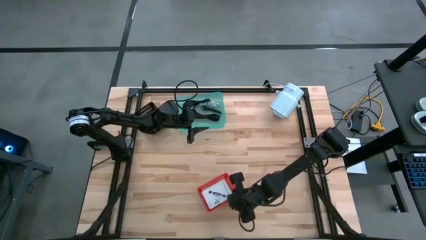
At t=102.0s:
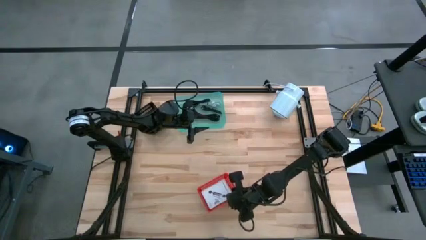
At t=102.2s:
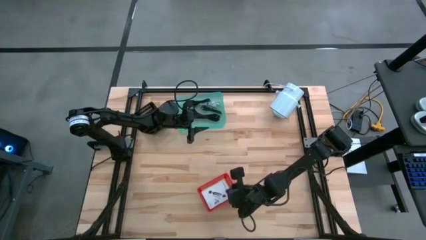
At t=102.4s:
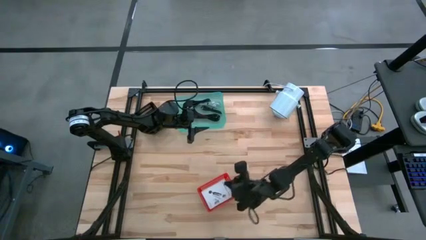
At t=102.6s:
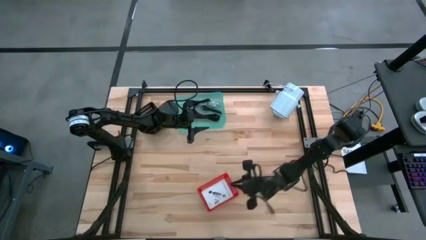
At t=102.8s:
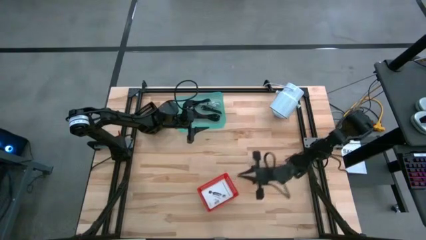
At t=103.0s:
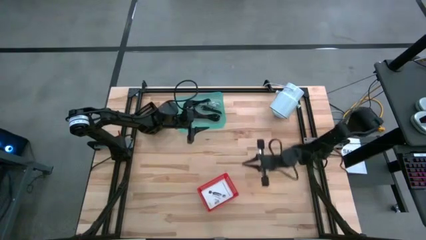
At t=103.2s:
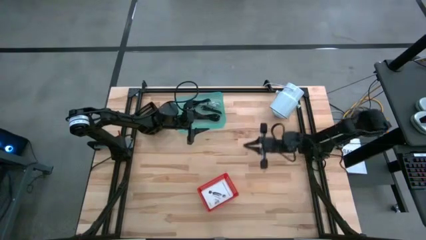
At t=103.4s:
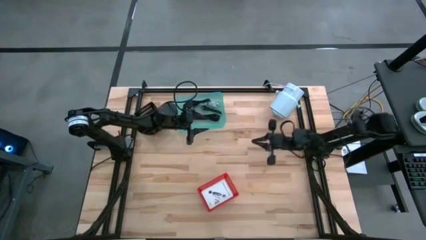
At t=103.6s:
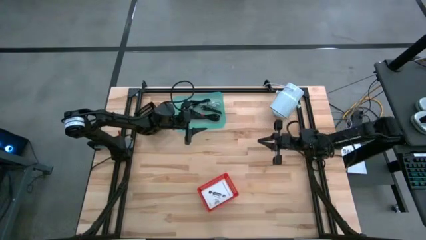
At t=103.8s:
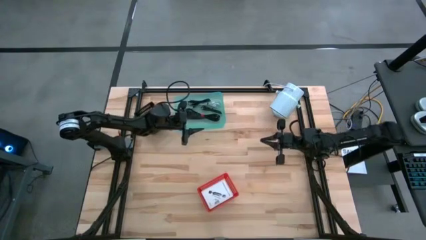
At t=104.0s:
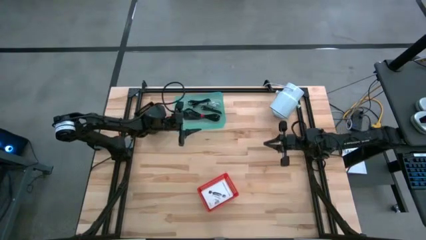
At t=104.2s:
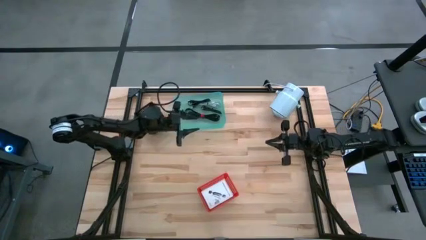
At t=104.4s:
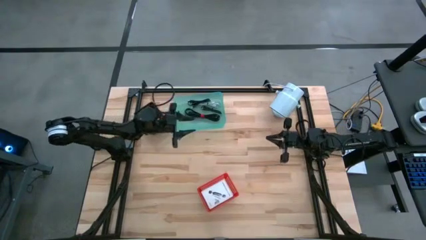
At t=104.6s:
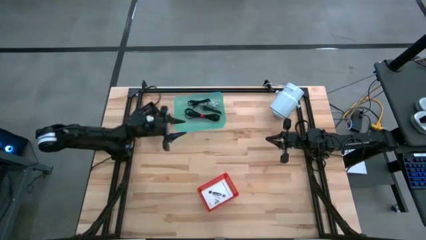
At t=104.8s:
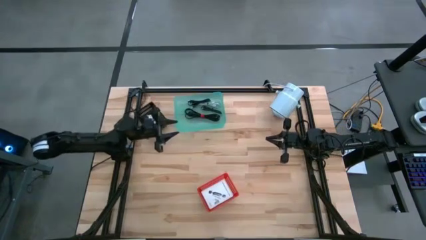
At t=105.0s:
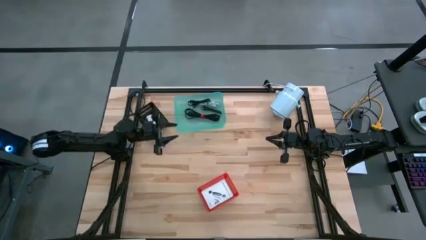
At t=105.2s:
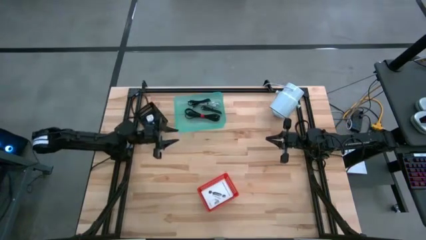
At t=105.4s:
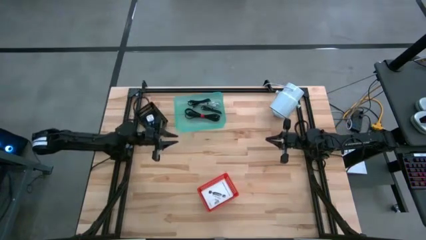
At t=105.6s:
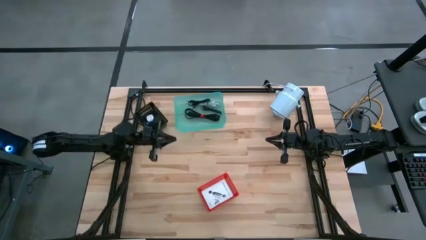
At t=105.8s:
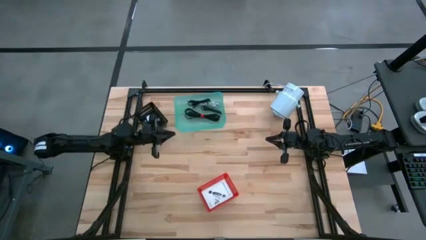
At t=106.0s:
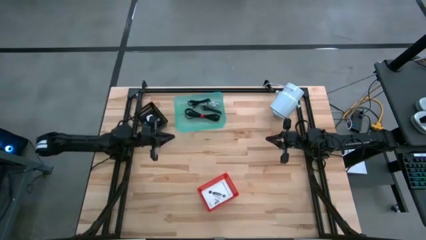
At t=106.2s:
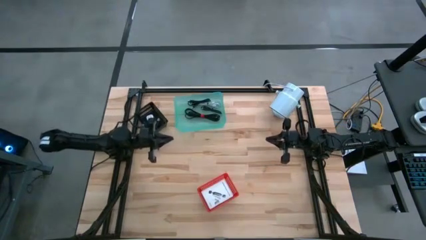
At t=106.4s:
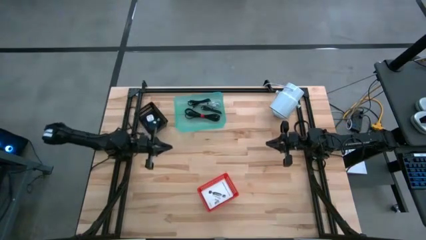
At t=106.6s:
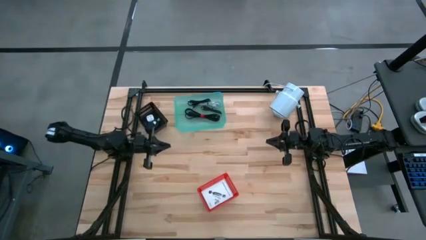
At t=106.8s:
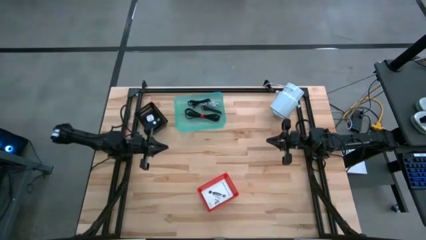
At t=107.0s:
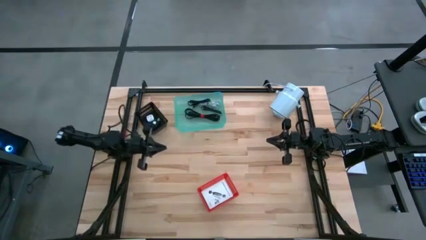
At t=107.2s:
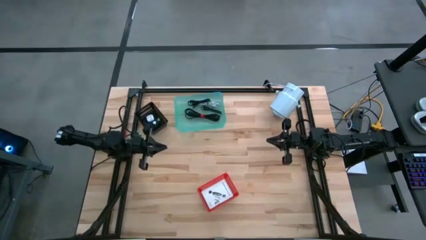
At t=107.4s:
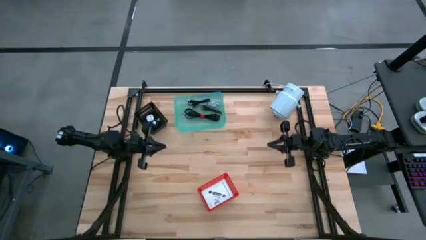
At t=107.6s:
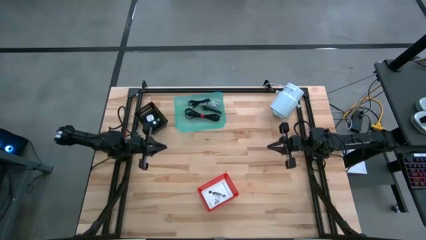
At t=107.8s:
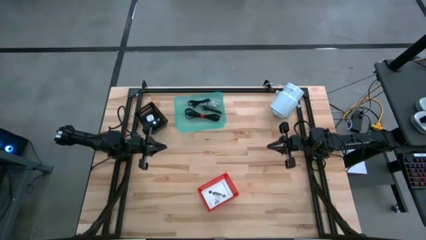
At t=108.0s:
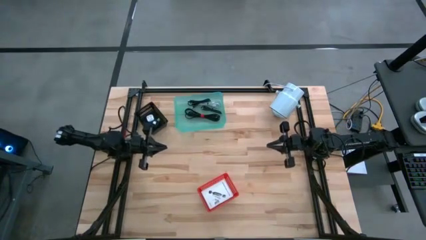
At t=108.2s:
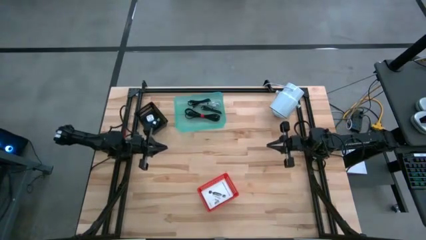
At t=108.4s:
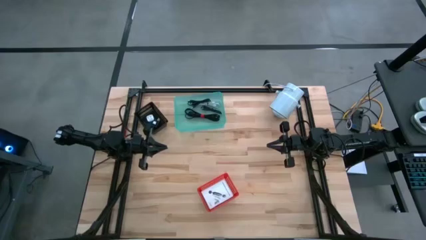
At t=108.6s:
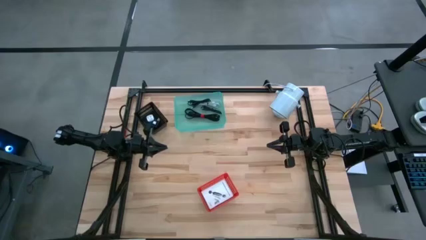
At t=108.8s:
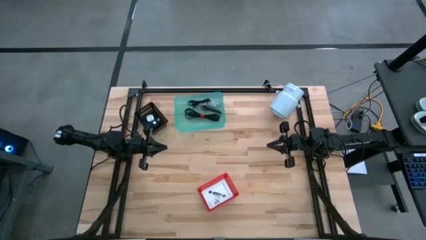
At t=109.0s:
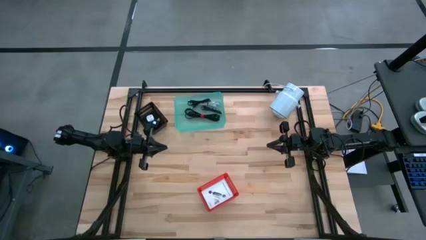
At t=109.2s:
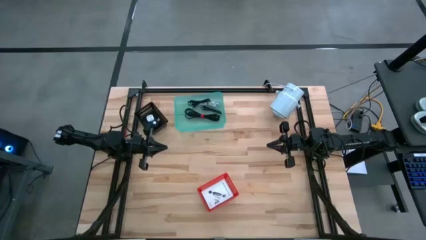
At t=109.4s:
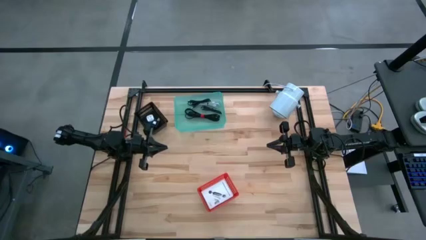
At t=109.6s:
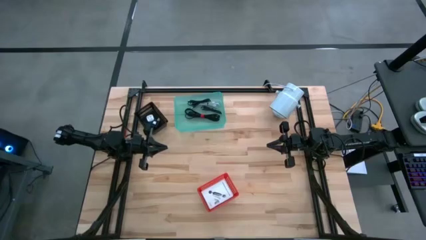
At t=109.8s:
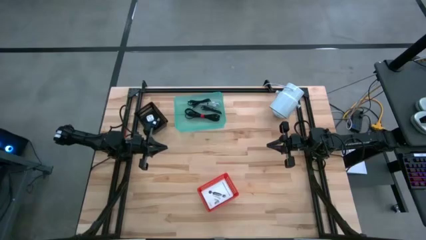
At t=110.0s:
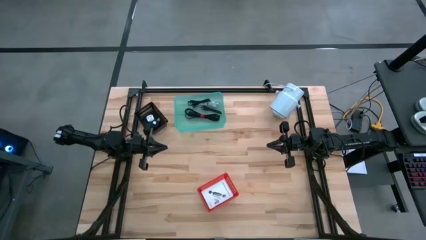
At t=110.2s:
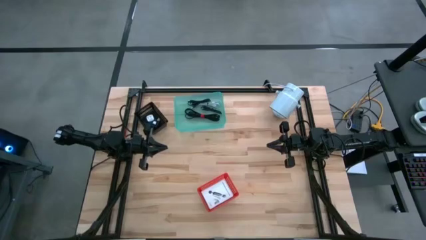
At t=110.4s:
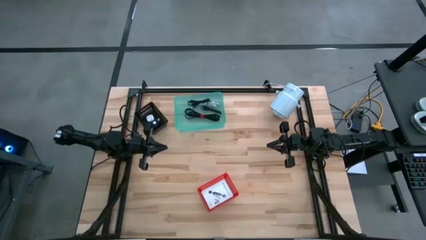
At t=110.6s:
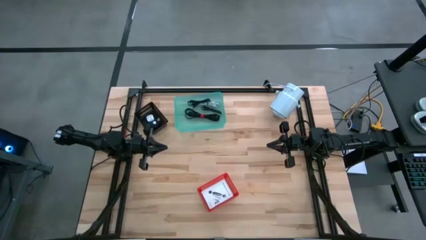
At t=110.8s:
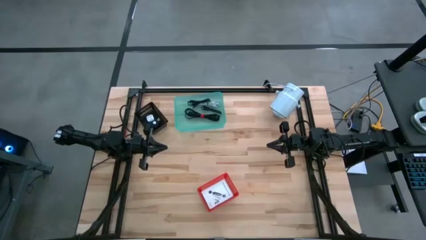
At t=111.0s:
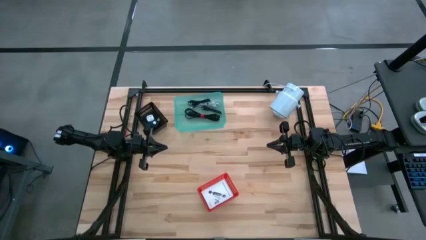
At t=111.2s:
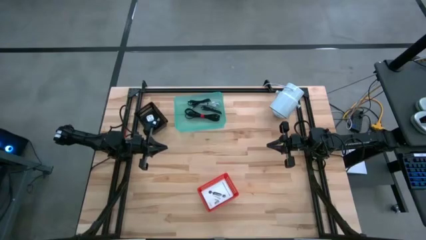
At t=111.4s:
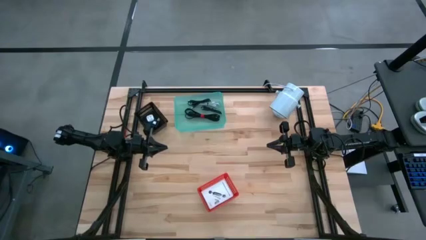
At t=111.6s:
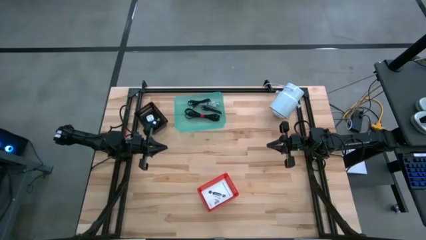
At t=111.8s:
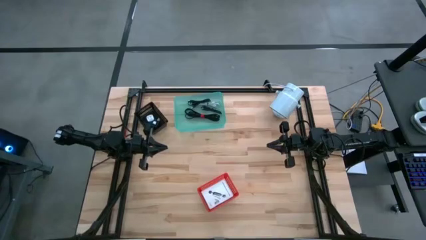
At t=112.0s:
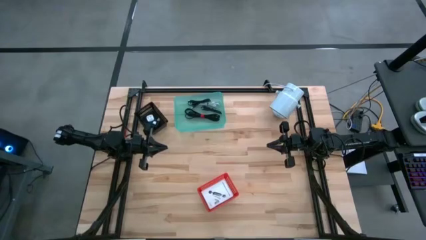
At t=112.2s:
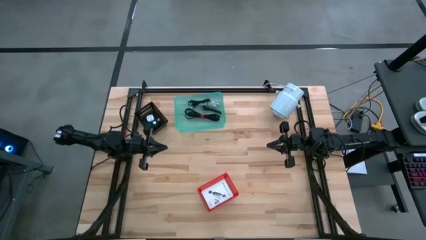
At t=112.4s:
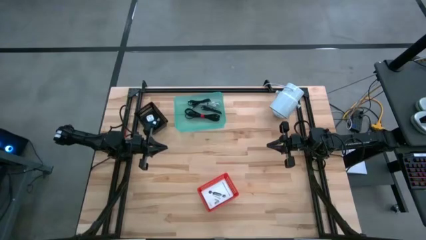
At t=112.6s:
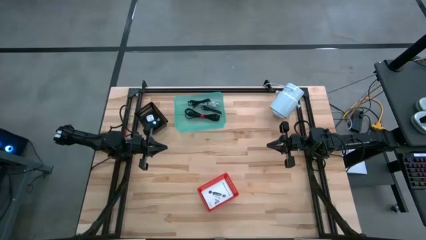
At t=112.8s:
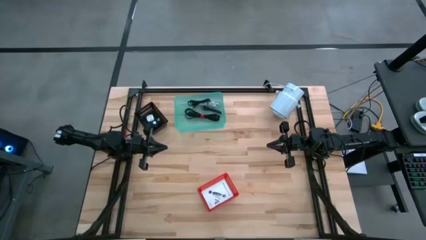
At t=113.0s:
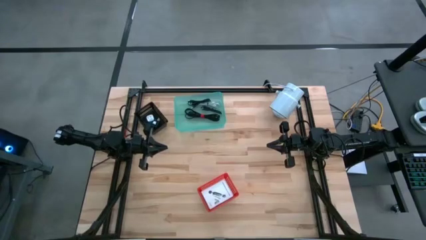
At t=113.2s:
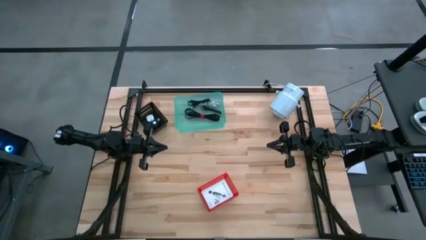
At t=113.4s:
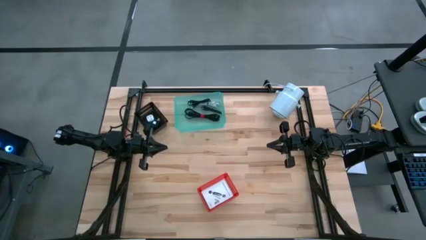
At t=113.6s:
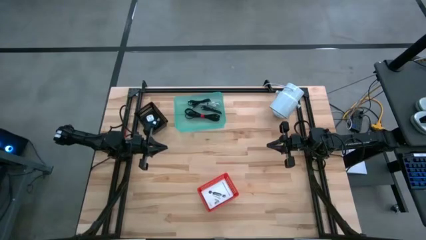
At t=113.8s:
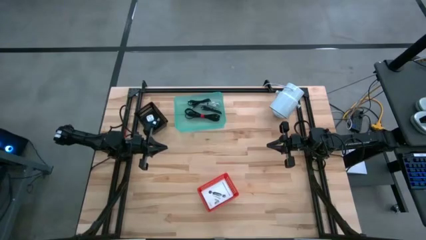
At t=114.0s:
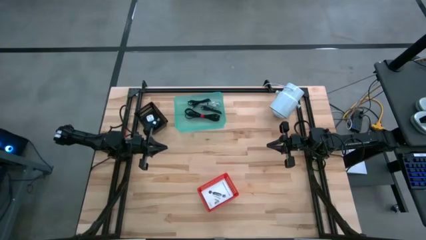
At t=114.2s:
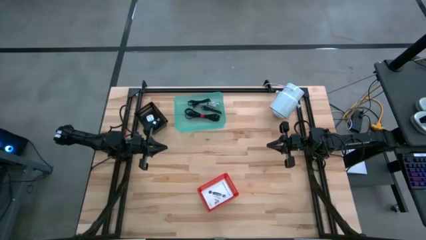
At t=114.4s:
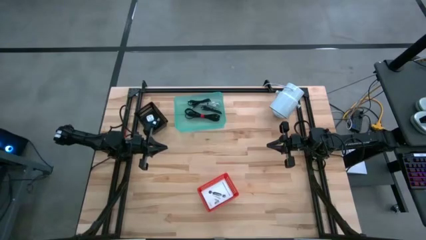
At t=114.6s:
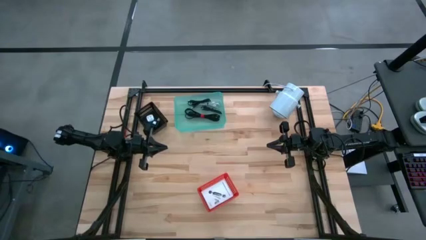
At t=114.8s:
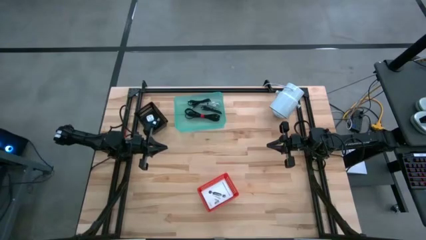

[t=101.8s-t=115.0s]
Task: Pick and place items into bin
Return to Home Position

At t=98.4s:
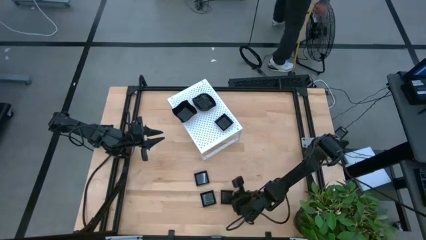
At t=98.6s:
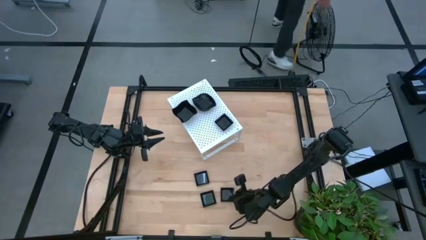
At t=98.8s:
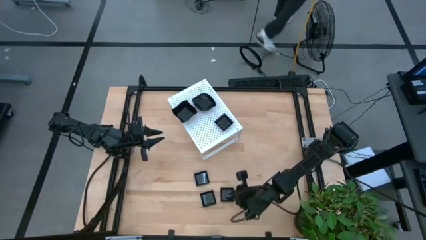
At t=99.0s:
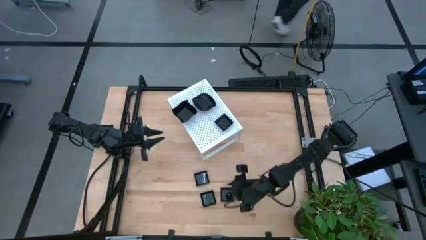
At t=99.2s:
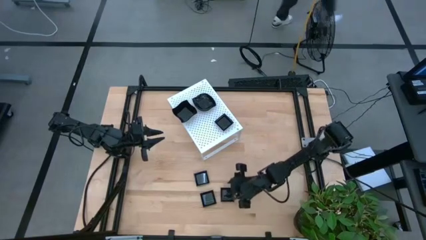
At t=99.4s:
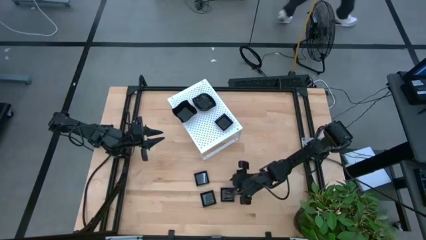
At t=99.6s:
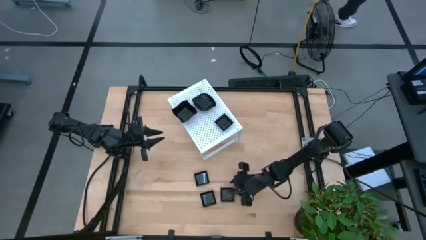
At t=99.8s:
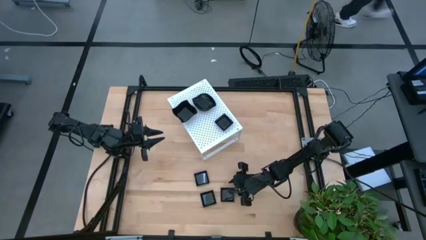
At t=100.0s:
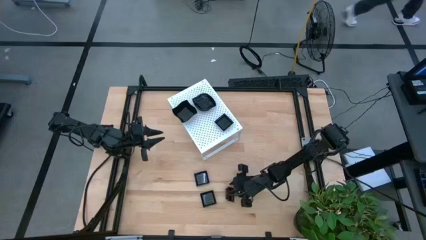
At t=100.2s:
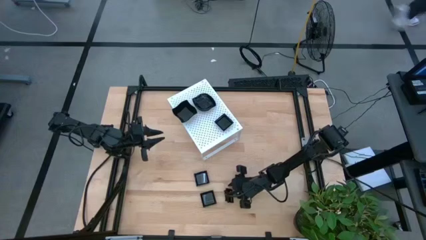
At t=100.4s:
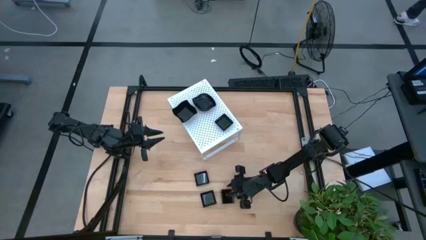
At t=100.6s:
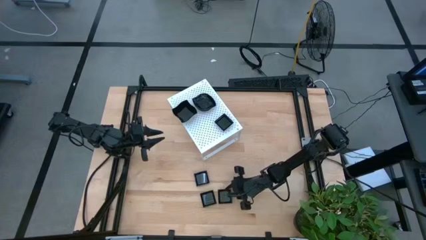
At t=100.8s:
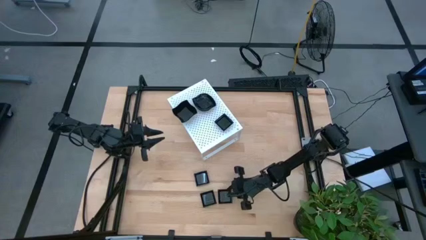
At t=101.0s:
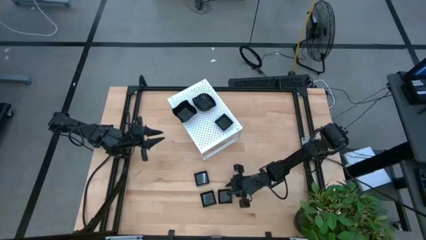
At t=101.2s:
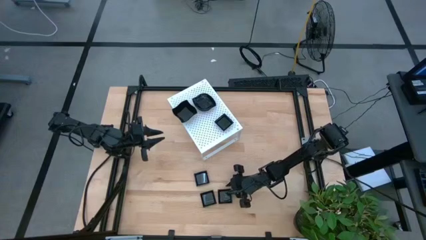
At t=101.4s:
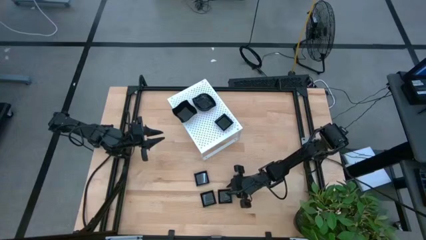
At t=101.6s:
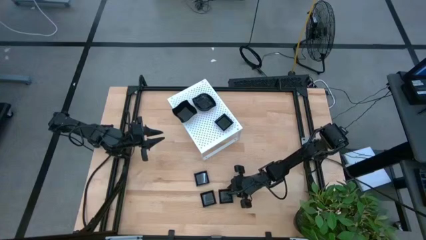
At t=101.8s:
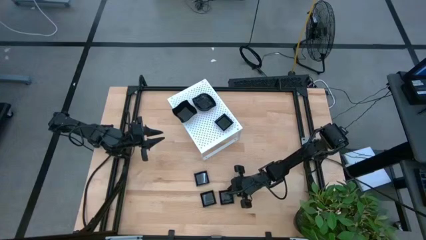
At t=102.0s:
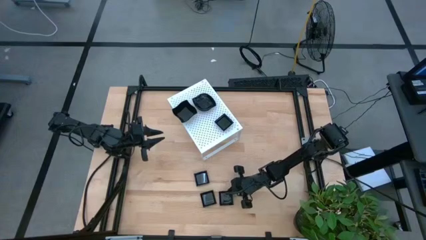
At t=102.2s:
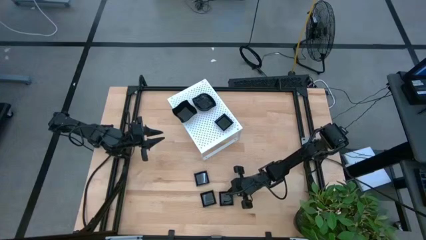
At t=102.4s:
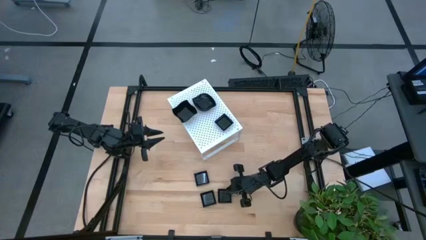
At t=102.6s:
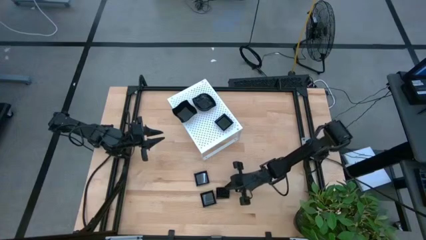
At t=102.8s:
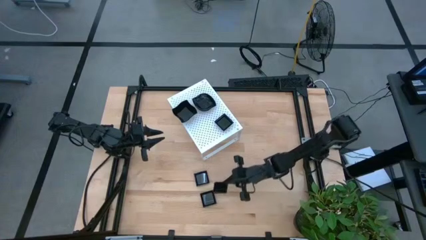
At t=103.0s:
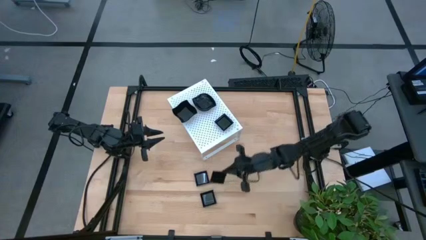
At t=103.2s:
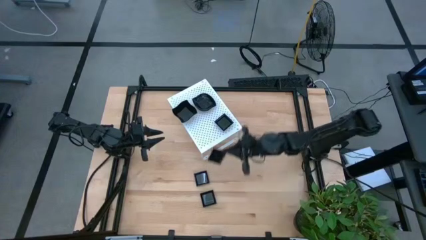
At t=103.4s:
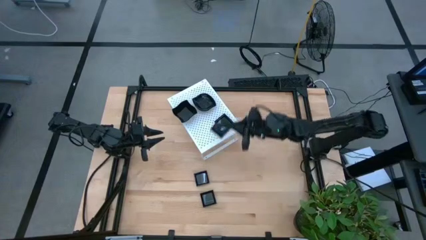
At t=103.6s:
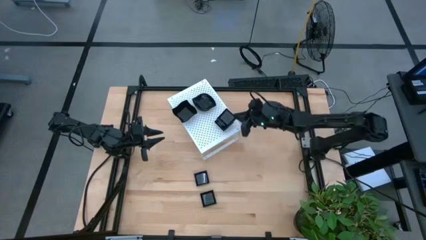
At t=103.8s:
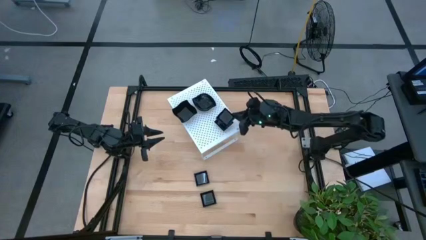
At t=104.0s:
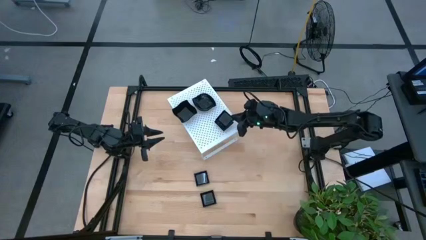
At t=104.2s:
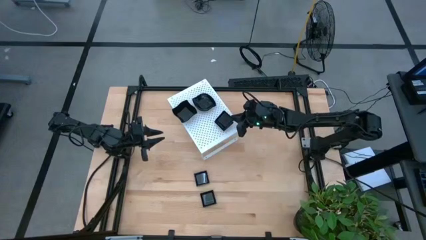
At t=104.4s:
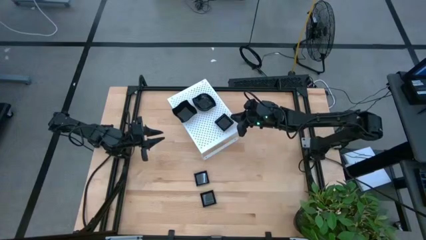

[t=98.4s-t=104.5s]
Task: Pick & Place Mini shaped plates
Stack the square plate on top of the stacked square plates on the shelf
